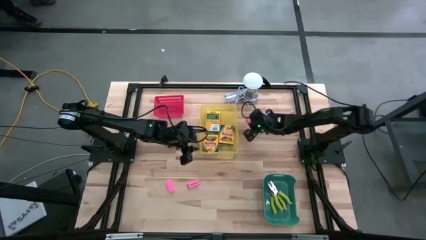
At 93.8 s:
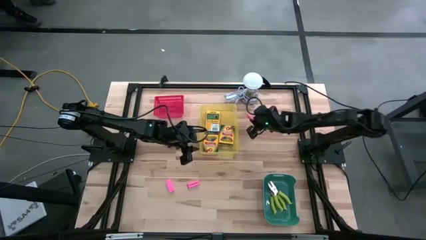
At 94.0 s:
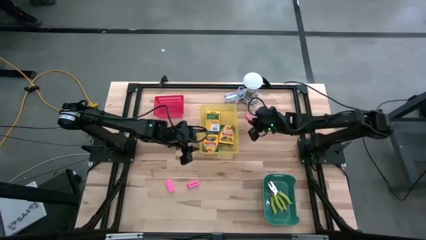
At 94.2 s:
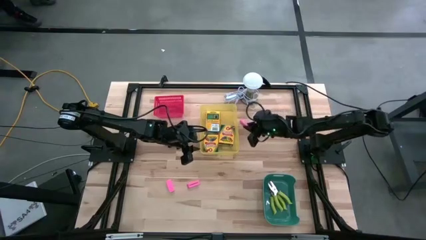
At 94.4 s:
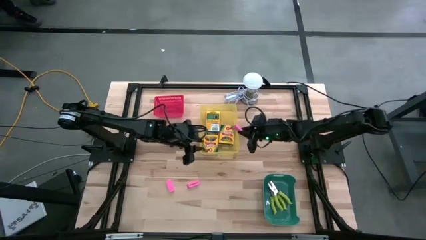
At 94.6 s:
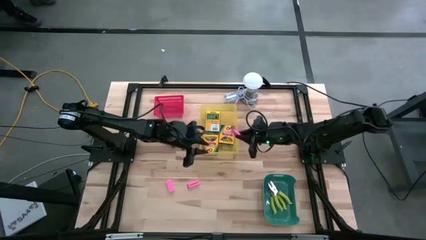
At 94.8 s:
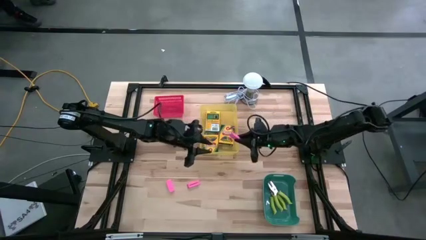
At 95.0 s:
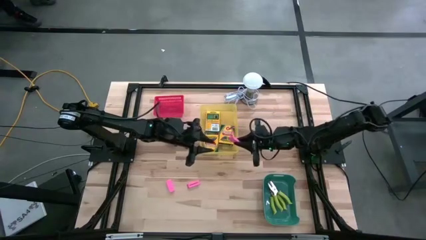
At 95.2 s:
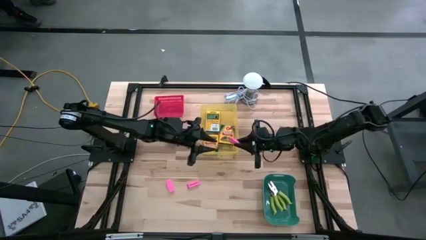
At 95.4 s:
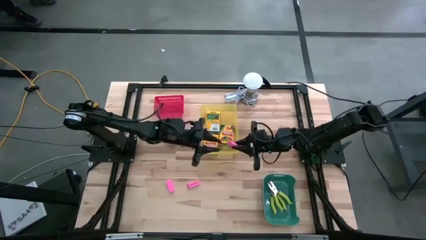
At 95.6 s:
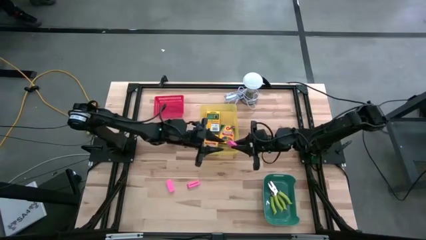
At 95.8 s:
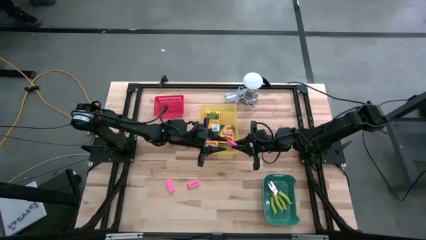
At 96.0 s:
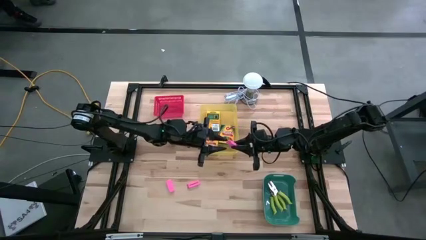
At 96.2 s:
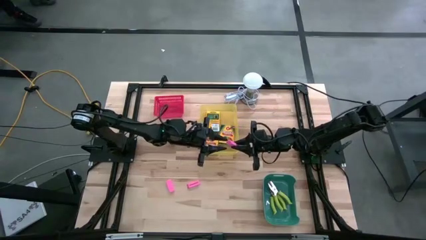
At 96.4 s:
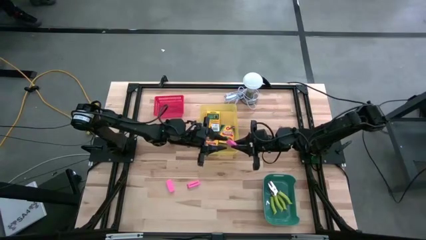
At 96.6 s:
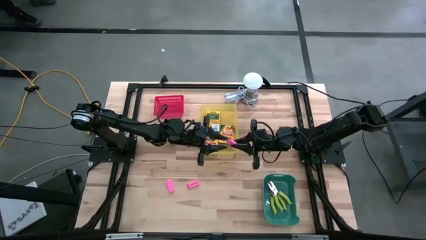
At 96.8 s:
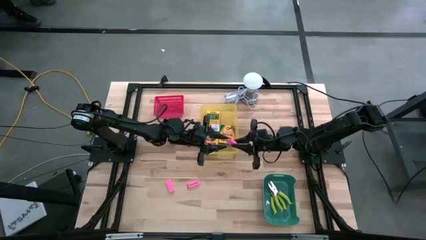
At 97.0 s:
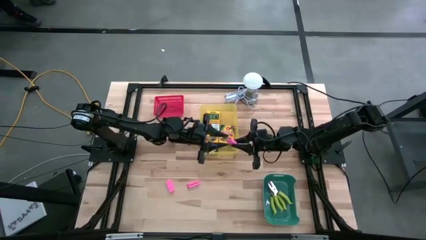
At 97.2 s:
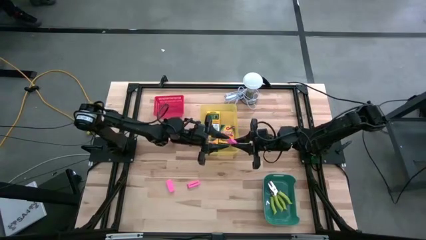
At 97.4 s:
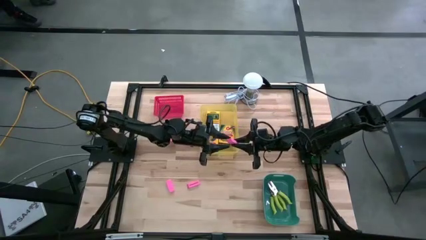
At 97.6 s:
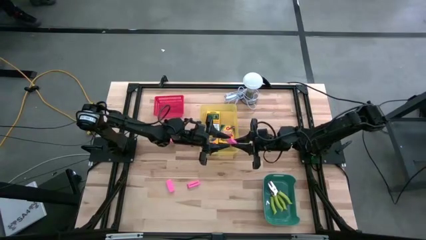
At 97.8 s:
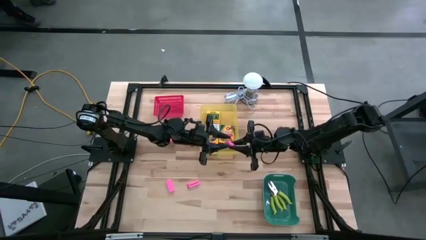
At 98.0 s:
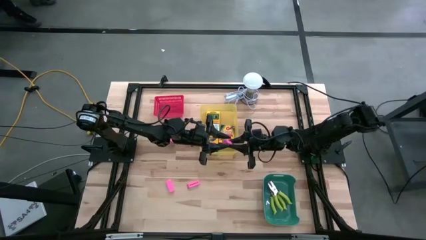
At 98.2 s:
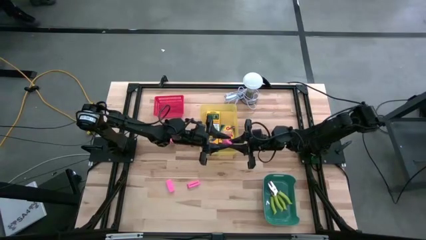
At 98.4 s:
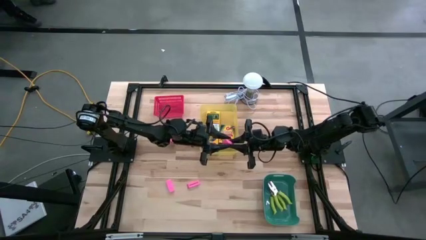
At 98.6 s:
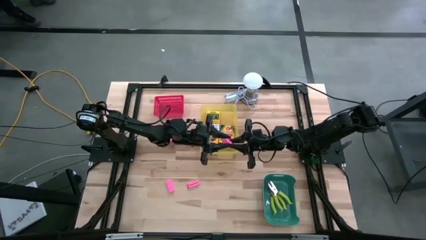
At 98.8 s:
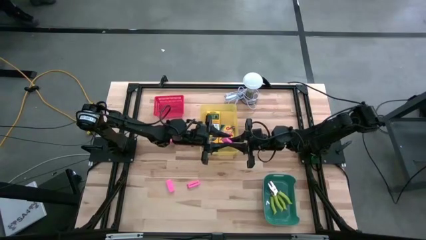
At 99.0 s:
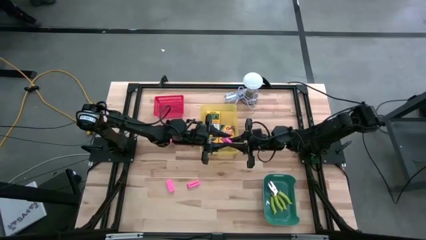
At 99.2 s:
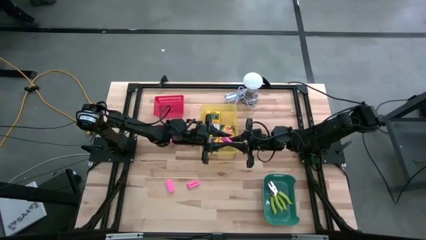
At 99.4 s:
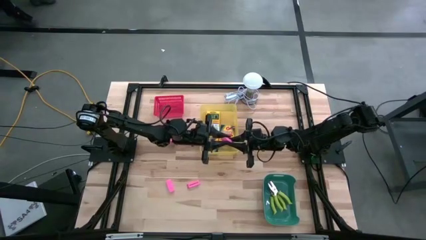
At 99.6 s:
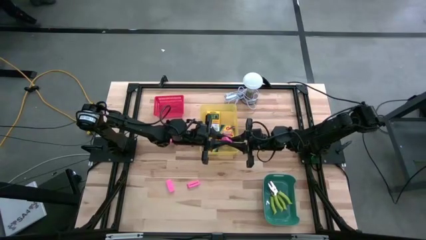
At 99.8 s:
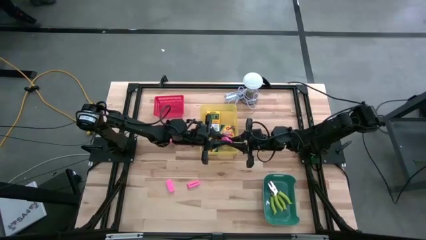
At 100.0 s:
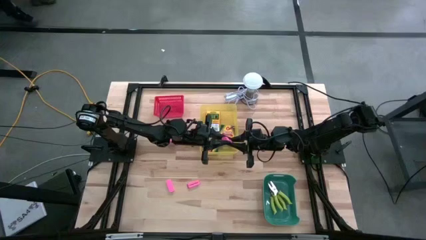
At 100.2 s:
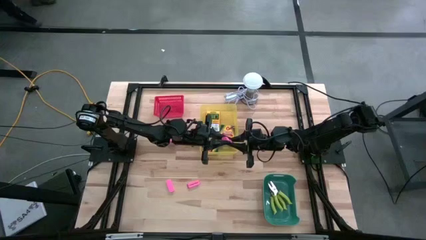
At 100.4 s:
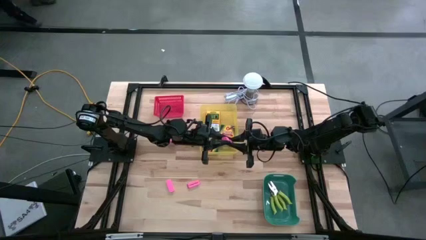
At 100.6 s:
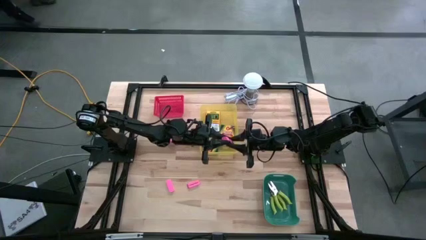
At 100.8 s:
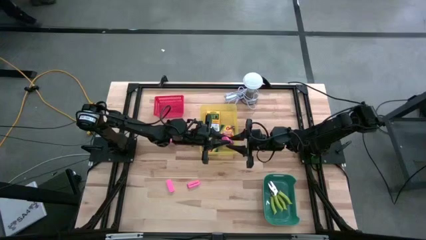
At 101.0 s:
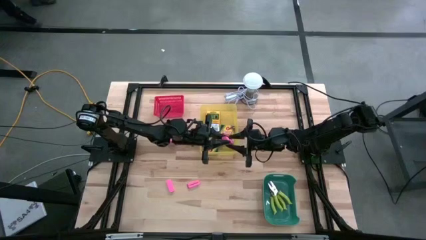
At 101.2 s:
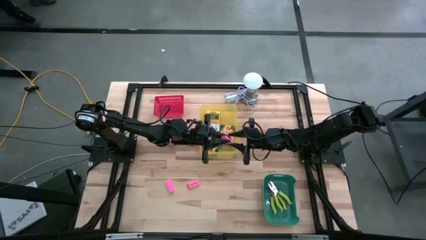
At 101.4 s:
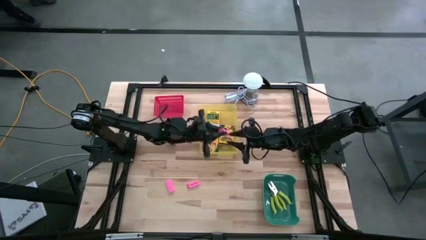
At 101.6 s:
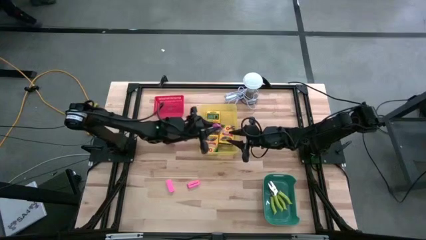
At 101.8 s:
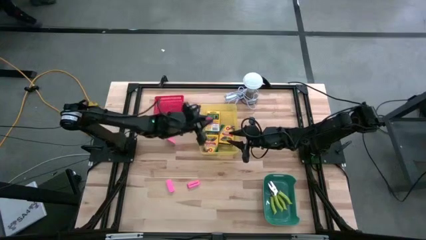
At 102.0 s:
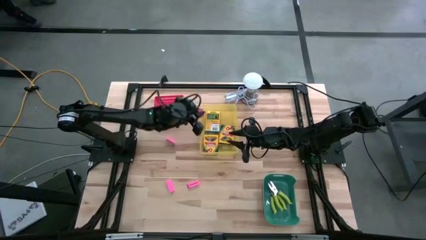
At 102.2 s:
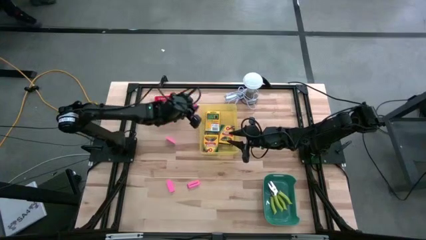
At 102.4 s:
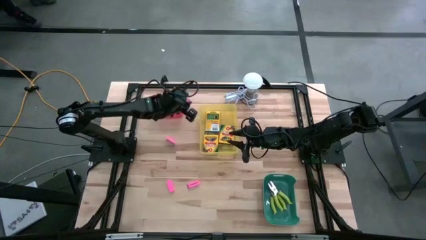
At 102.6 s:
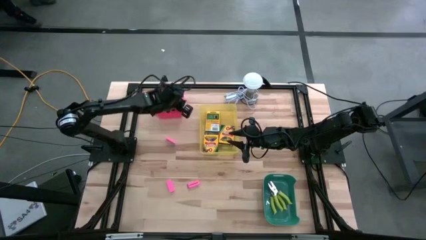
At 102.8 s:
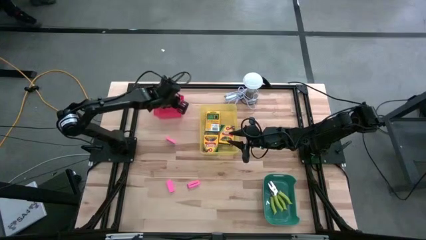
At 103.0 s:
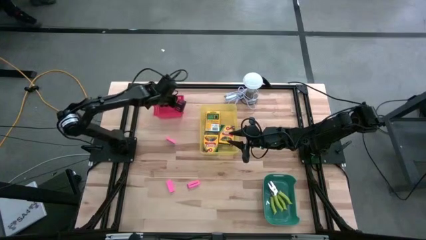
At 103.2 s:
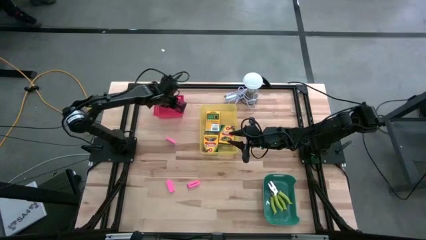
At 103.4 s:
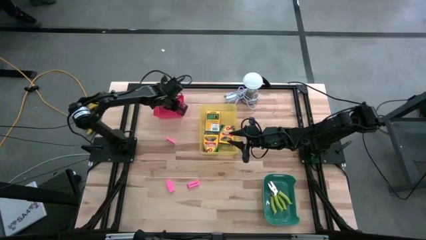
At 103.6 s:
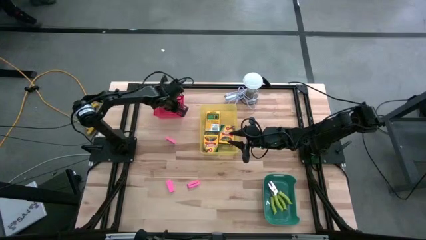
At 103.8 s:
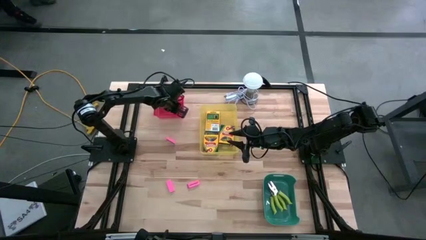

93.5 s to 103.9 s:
Task: Pick & Place School Supplies
Put the pink eraser into the red bin

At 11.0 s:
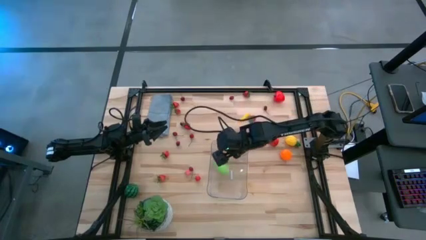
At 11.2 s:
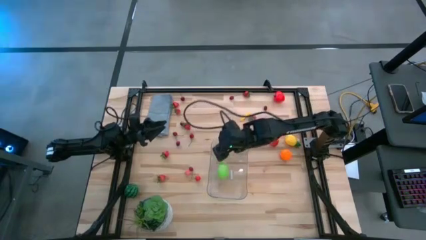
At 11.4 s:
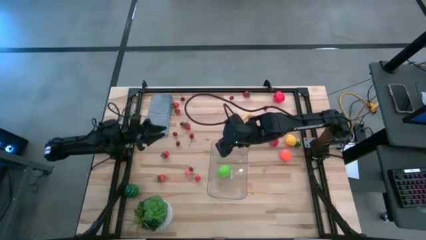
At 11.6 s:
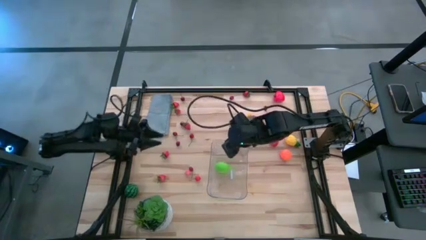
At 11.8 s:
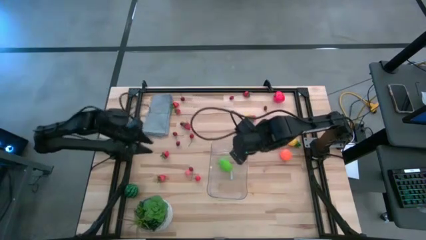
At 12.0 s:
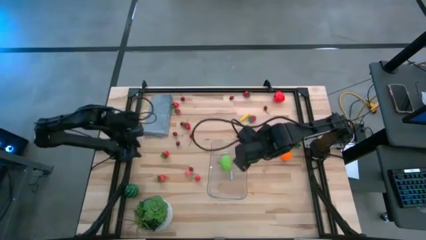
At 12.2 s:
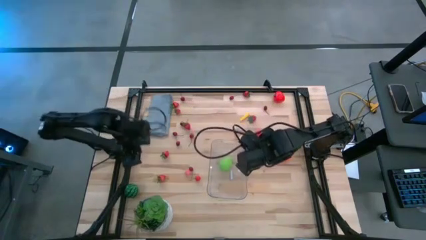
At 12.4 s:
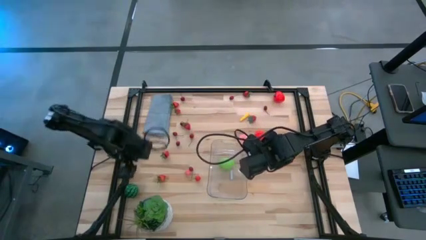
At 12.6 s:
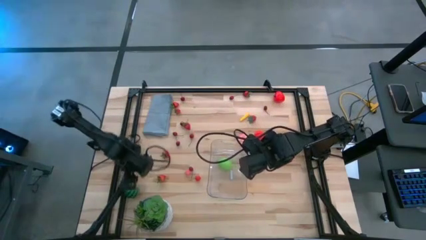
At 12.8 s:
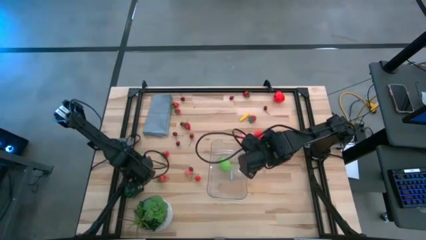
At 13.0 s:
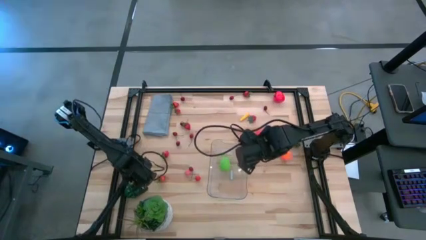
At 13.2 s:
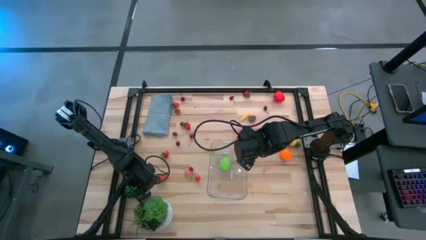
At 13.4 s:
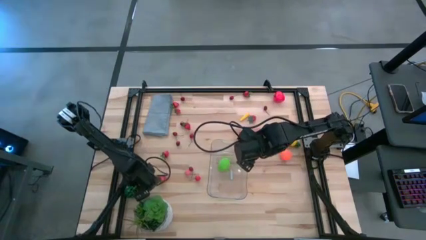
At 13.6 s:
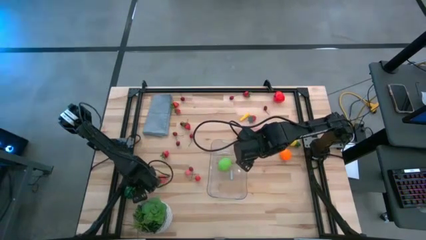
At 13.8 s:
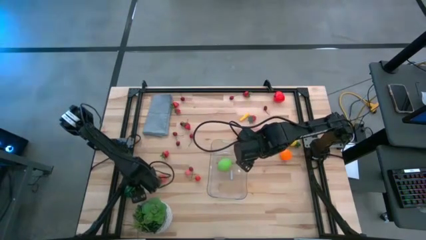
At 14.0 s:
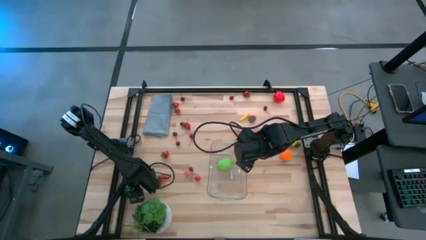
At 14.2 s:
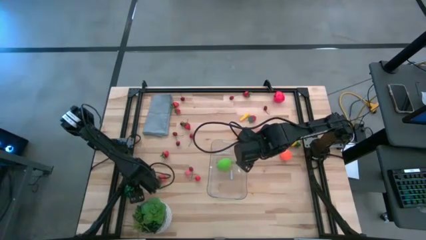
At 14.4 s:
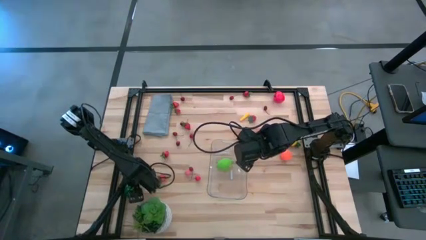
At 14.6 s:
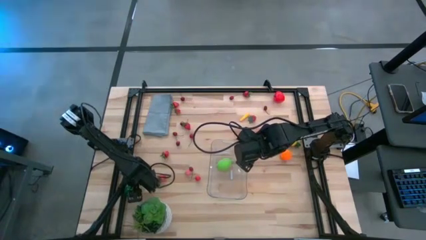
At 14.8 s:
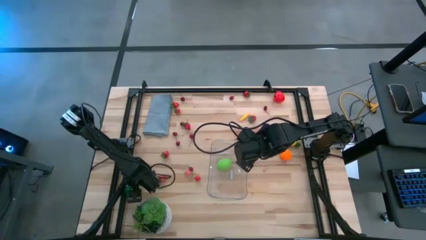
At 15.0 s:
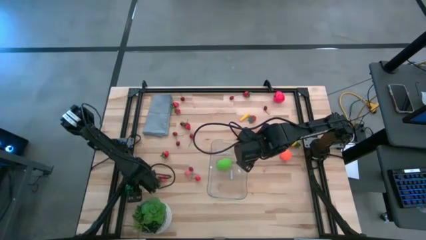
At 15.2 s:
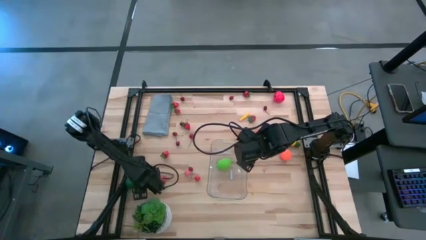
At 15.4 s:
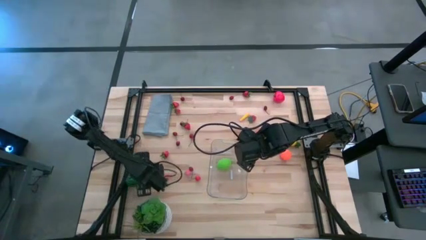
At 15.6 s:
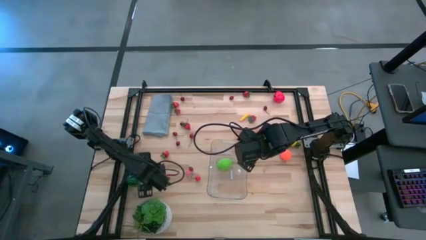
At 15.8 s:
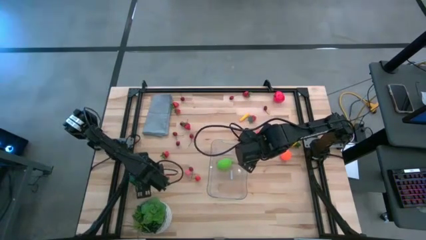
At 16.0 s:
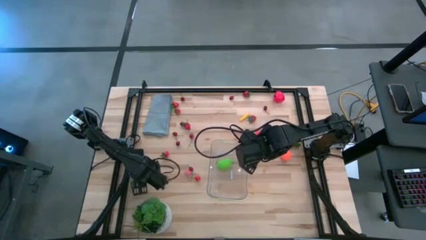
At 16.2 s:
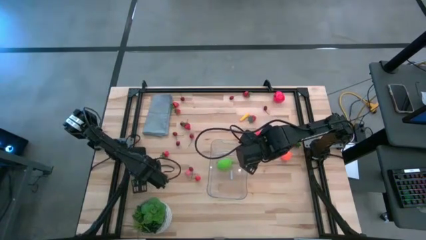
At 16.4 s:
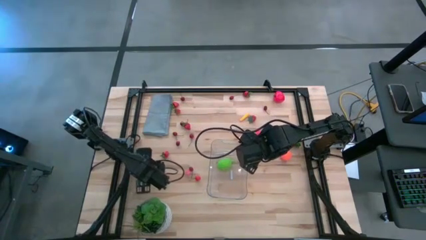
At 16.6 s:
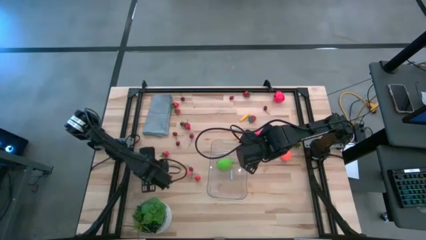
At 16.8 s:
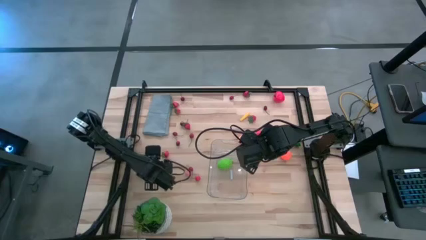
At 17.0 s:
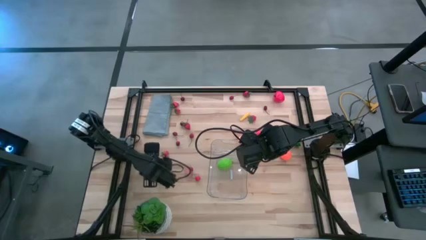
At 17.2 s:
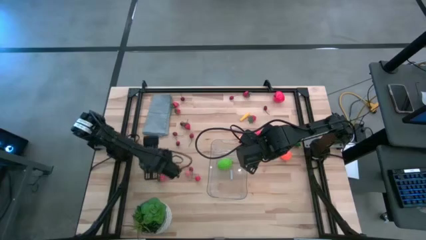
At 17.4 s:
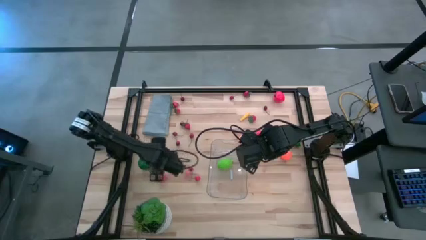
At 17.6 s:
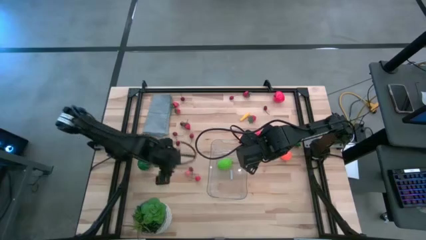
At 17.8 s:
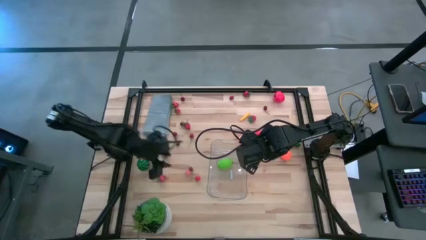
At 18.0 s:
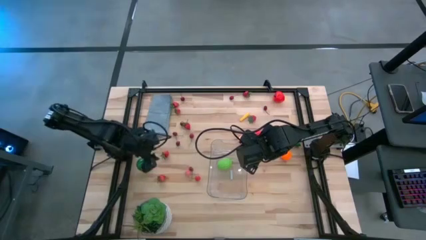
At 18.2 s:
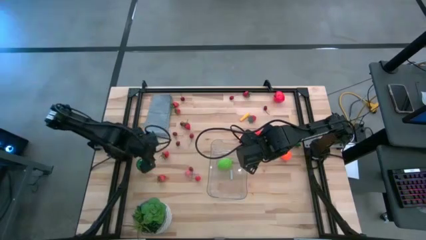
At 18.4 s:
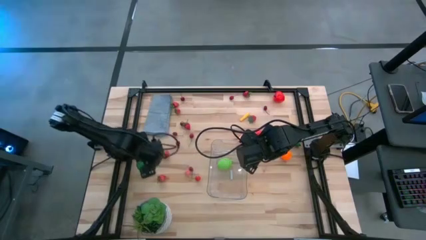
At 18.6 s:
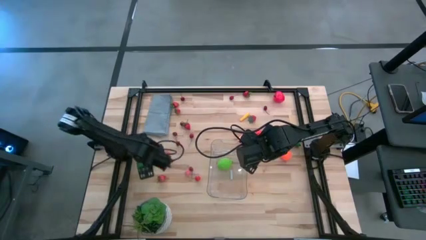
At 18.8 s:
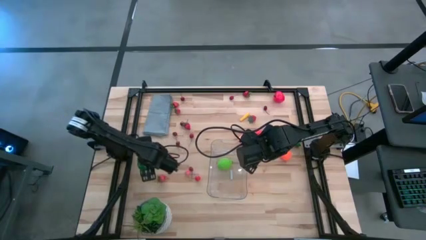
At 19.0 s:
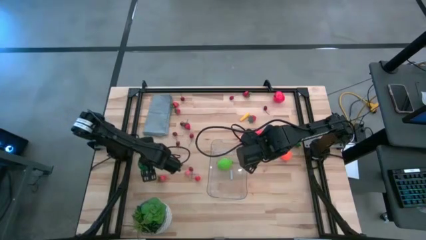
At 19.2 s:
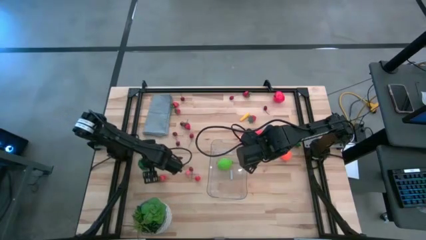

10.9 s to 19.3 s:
Task: Pick and placing Produce into tupperware
Put the watermelon into the transparent bin
